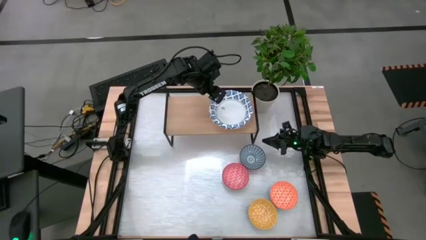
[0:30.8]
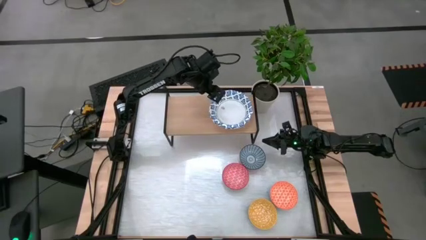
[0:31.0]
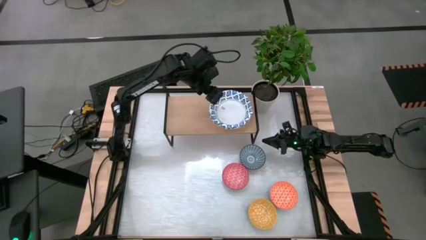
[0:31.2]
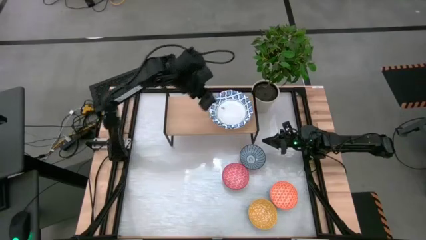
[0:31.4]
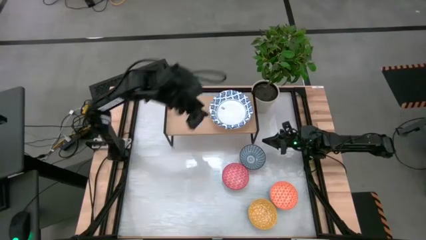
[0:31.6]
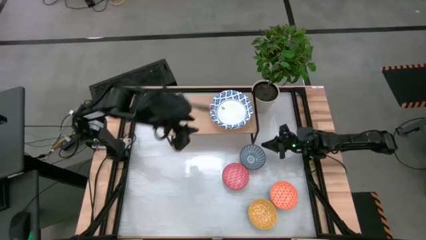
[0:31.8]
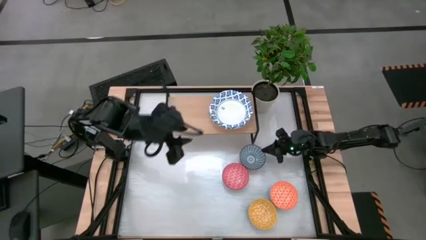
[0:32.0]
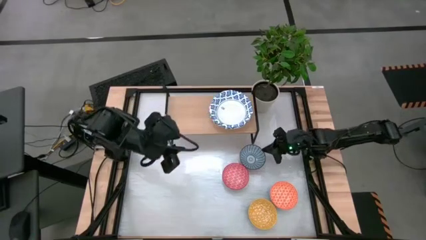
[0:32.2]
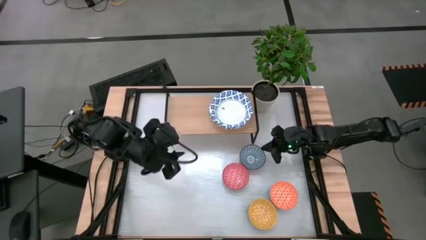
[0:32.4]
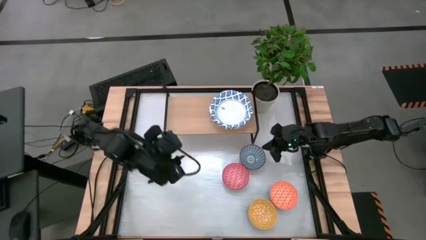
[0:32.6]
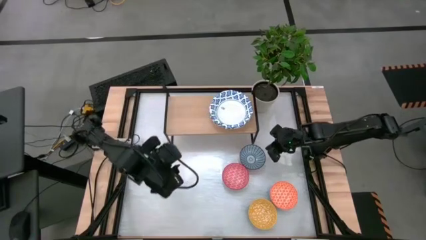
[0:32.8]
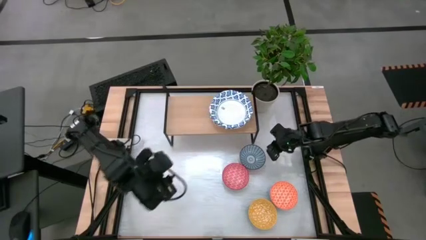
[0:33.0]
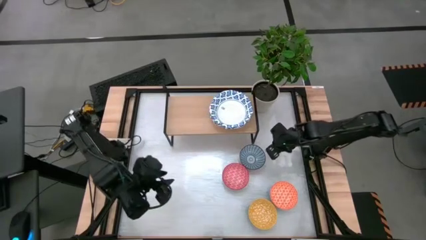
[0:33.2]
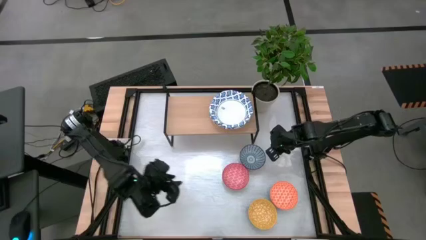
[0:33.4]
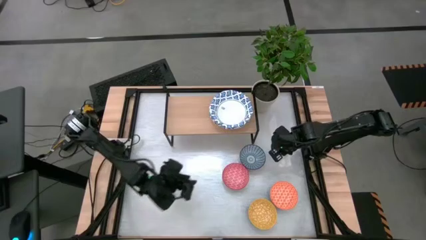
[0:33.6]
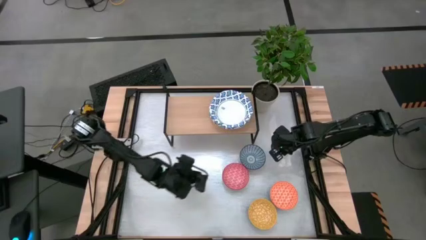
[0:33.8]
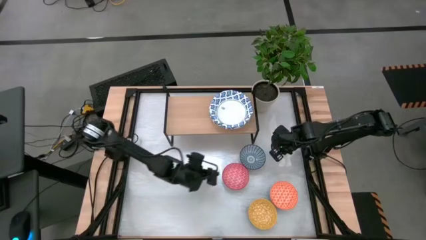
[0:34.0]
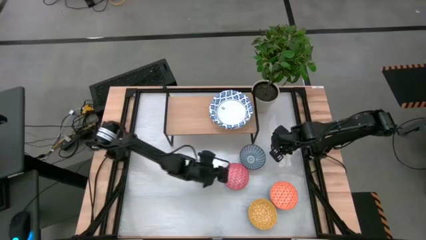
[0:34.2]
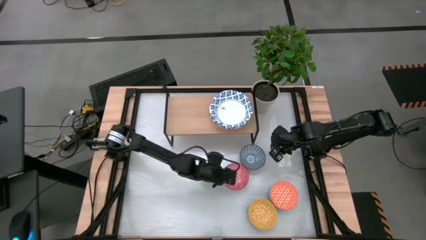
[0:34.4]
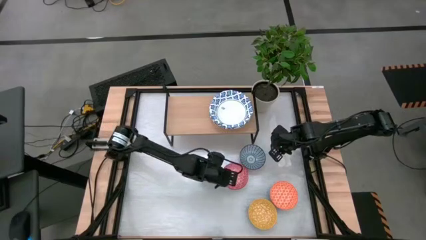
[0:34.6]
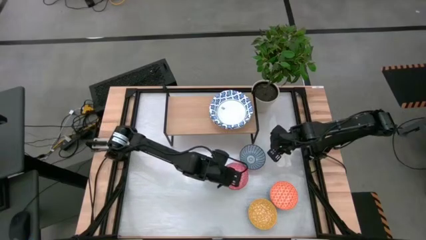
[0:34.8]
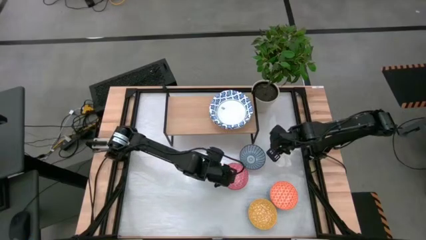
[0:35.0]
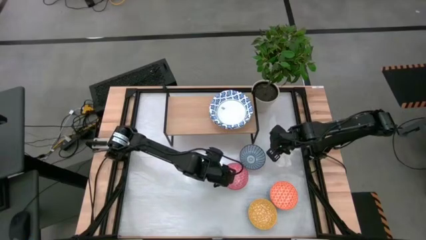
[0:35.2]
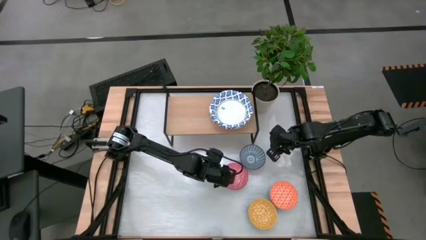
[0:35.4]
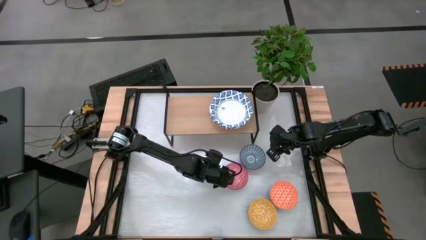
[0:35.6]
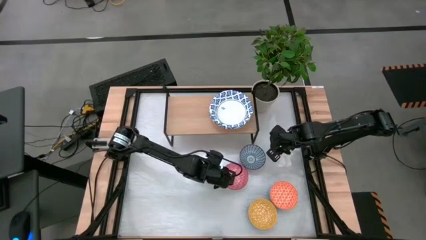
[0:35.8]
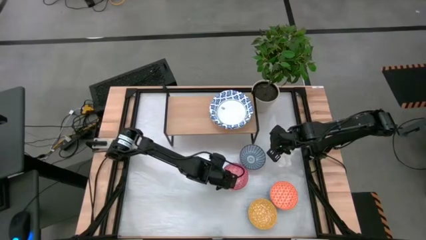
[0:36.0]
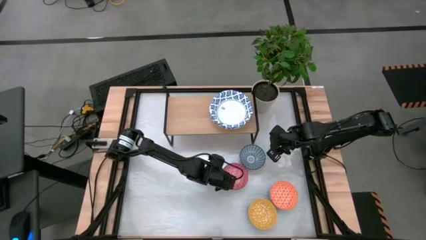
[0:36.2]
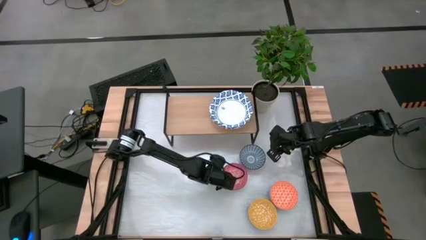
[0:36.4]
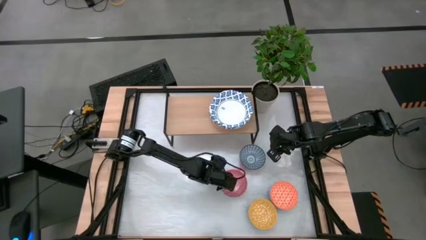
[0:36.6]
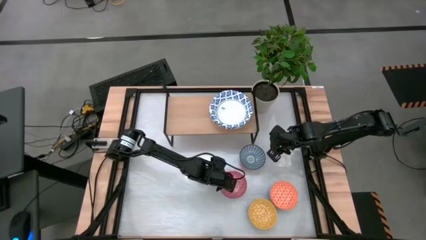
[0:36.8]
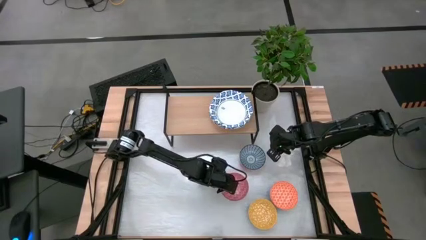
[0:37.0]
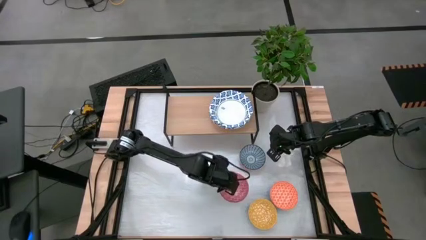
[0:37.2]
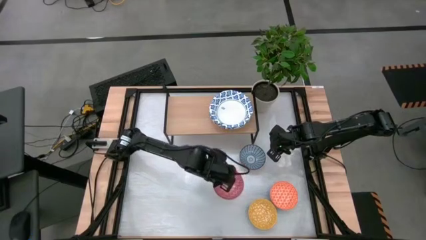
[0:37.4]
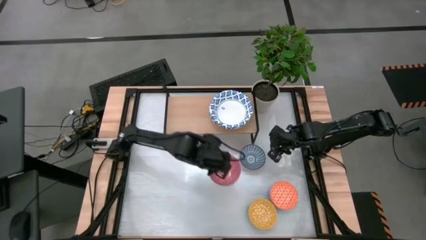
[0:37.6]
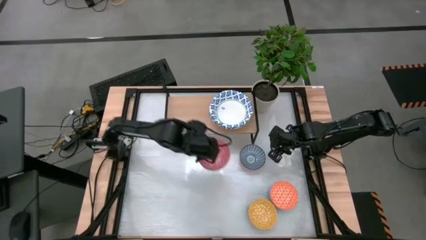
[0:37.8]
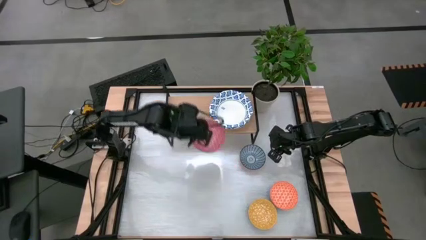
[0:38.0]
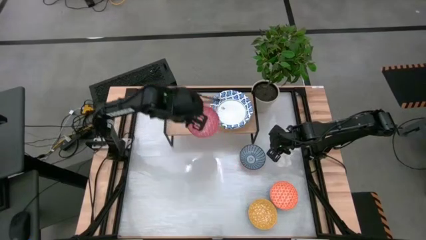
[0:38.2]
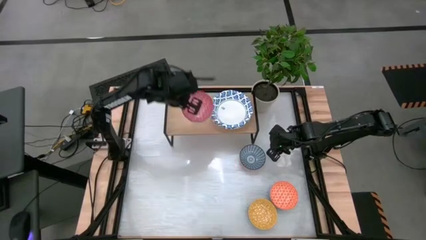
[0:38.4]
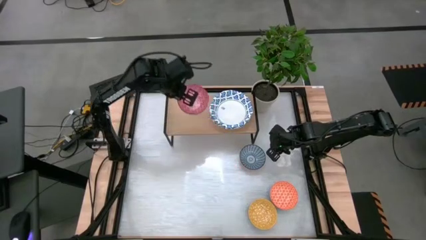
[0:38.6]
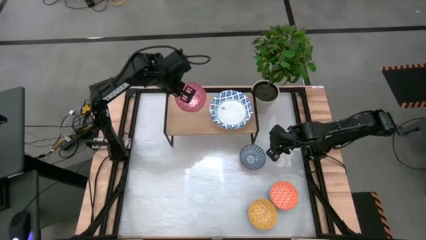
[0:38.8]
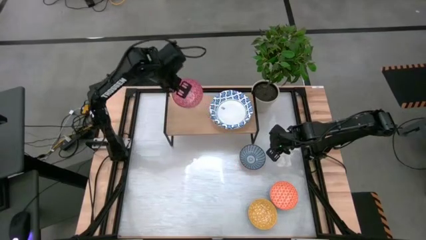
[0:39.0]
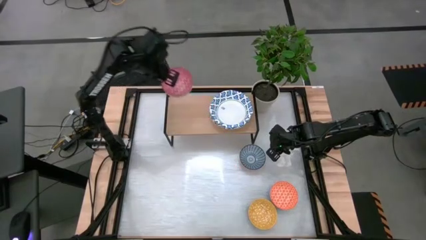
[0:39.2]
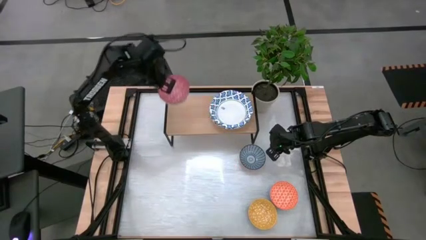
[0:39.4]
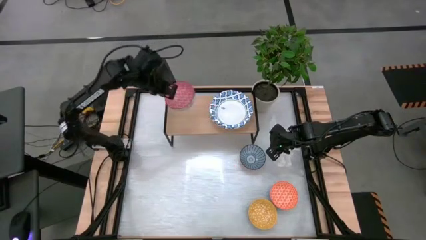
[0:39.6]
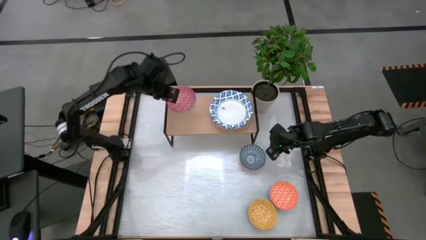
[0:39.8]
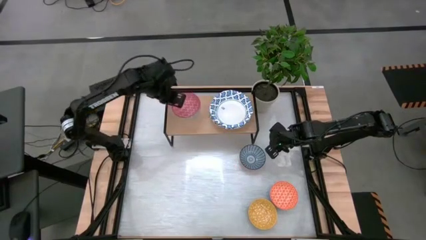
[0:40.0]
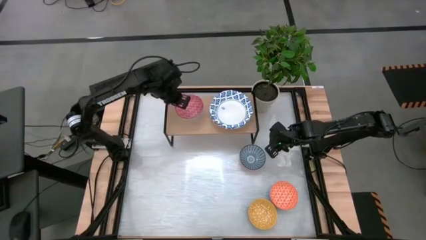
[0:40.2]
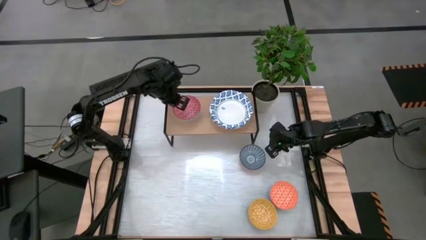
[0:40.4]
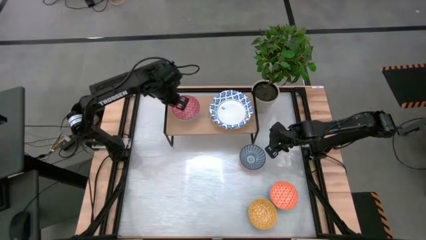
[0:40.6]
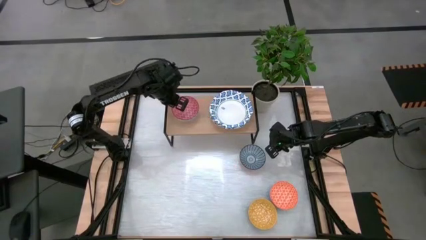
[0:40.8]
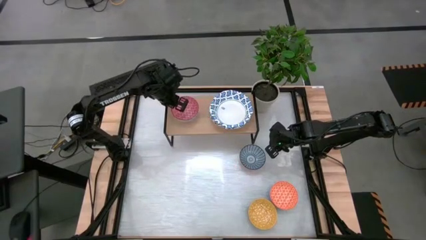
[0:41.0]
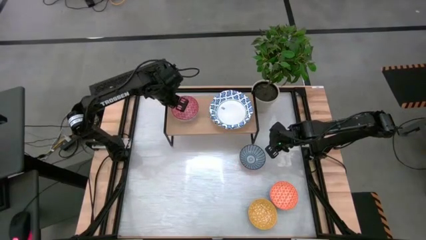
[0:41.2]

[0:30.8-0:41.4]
Task: Place and stack bowls onto a shelf
Put the red patterned bowl on the shelf

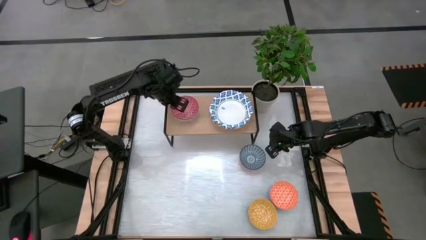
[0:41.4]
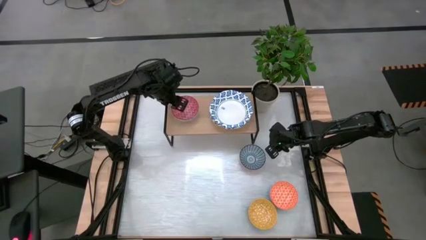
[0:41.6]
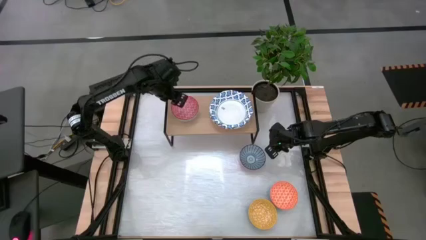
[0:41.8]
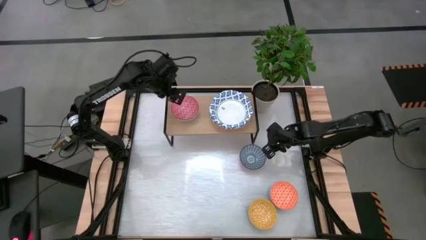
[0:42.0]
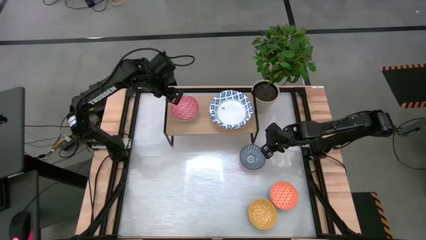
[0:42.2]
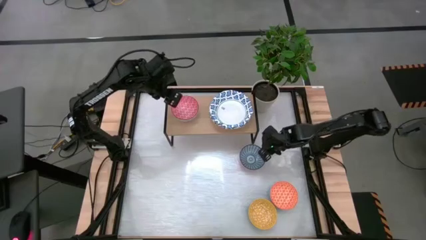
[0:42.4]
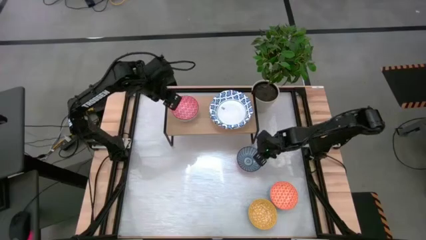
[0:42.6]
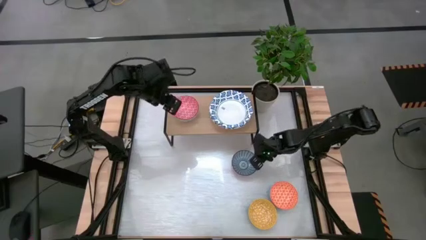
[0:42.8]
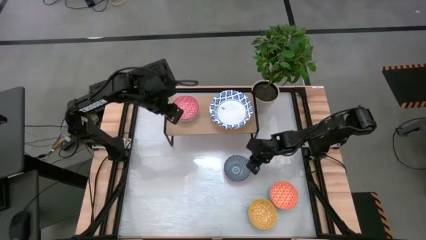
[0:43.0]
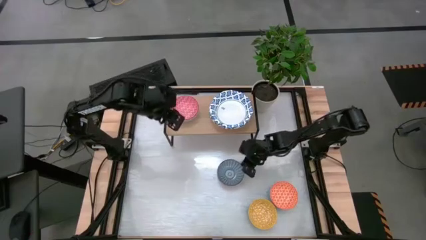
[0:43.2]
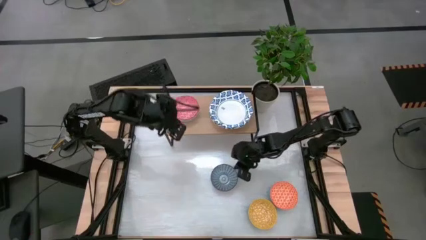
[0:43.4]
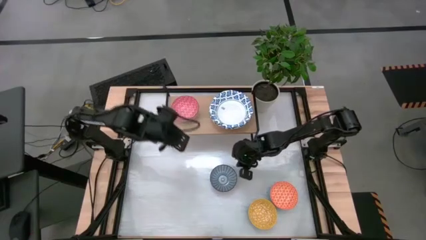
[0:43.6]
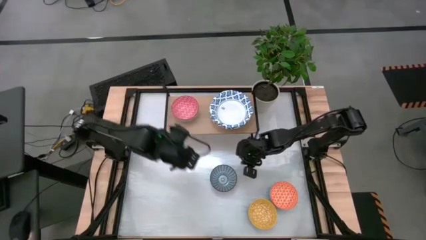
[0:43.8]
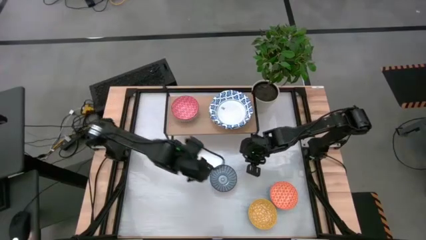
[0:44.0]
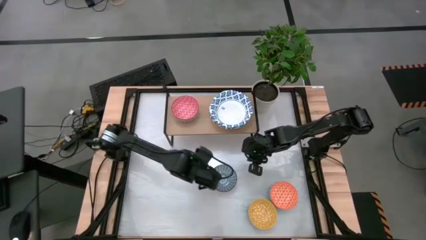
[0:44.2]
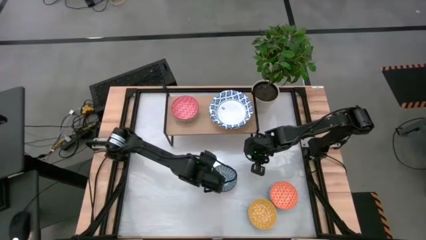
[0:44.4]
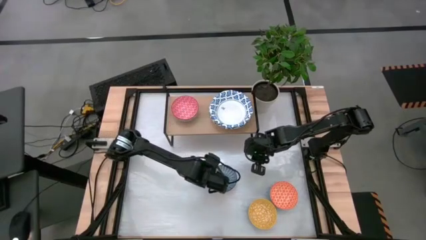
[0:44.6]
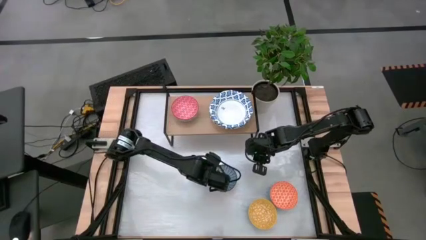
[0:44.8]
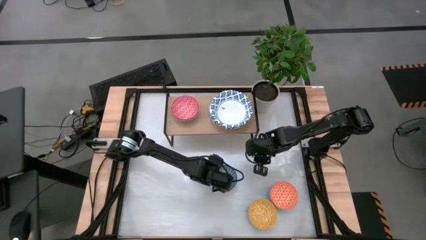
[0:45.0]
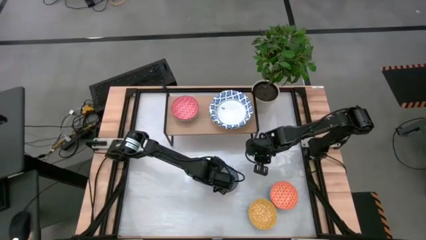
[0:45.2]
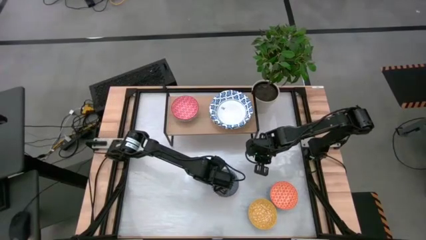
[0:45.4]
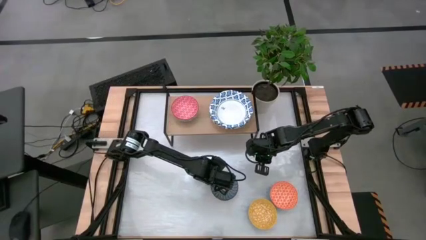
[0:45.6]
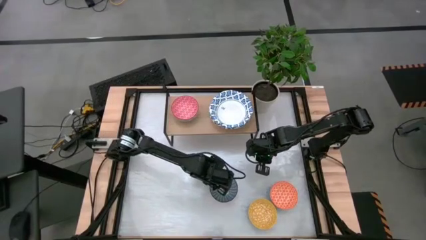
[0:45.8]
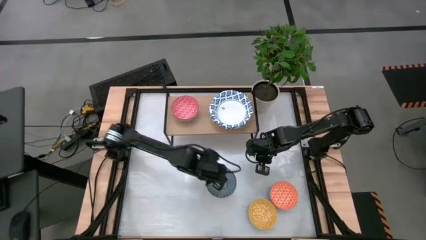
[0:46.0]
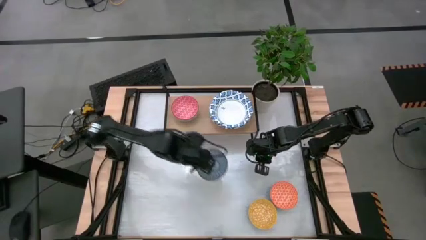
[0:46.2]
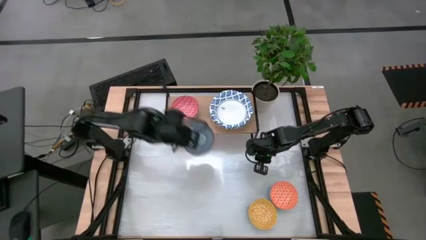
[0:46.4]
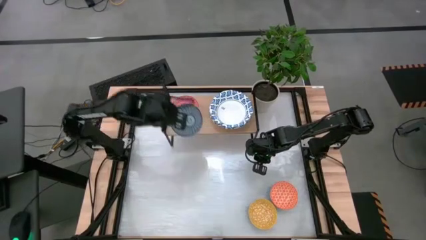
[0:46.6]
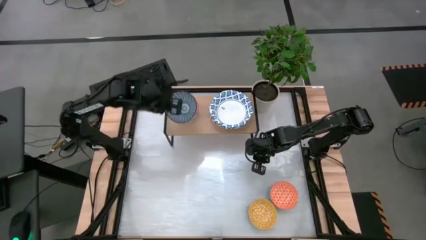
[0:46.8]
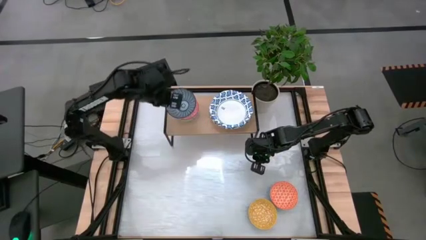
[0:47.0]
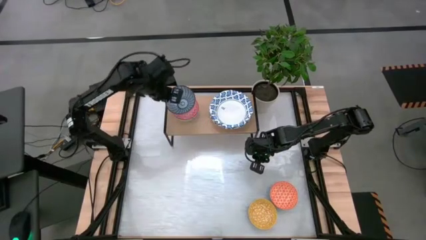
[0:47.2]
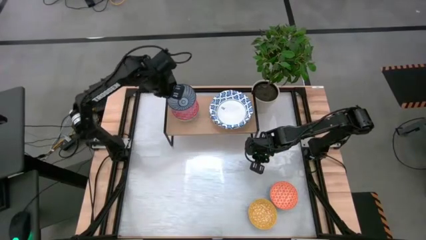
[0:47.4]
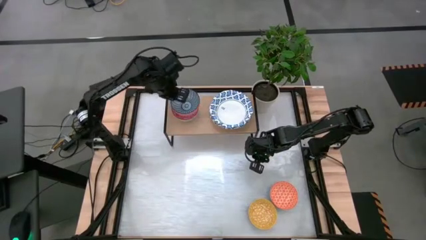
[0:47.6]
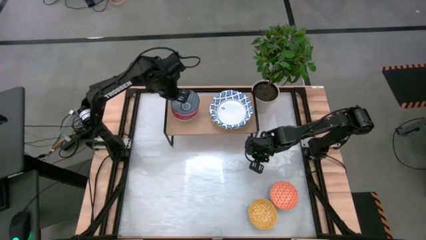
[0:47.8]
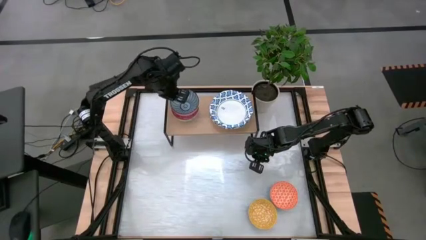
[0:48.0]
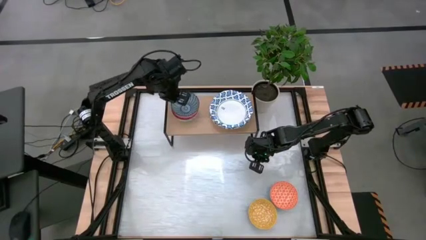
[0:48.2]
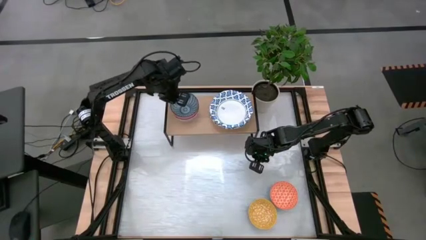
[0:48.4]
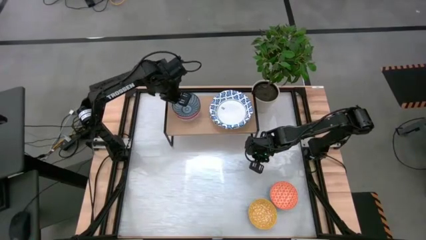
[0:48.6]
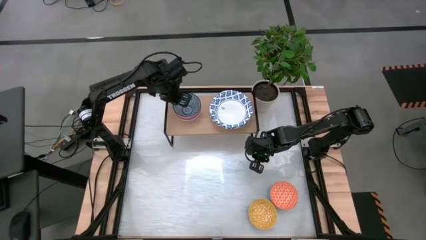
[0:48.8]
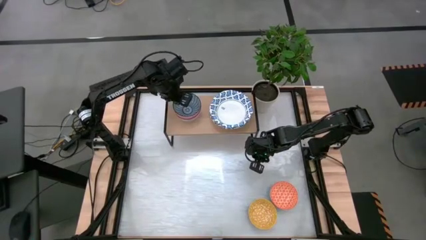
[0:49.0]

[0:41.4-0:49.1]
Stack the blue patterned bowl on top of the red patterned bowl on the shelf
